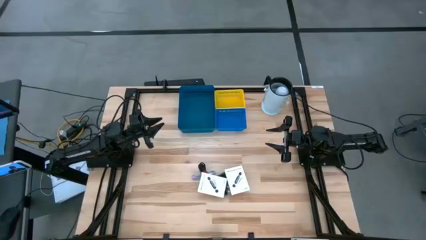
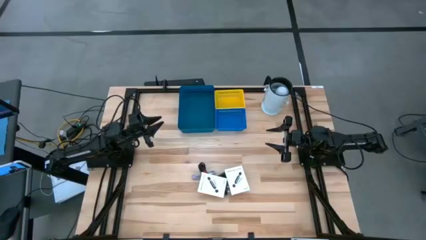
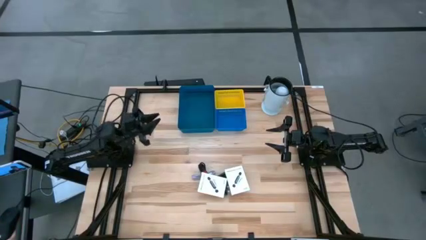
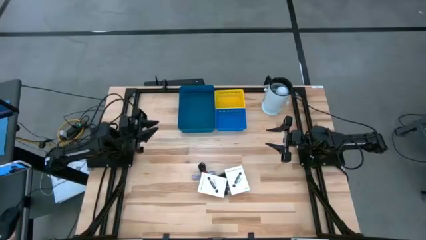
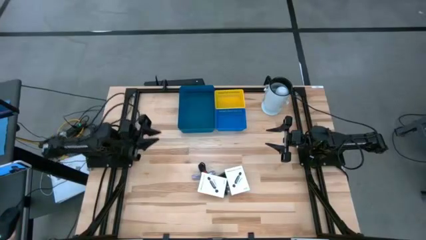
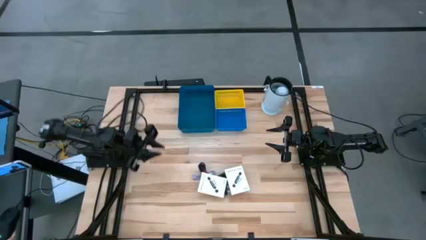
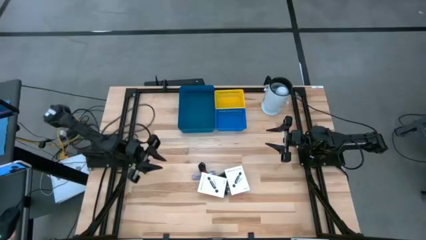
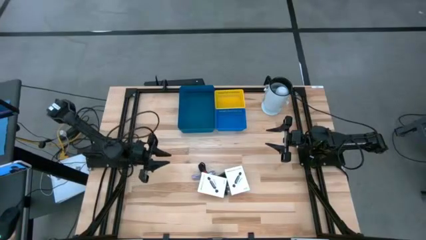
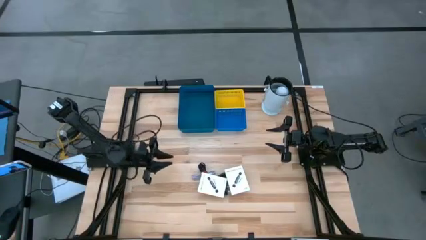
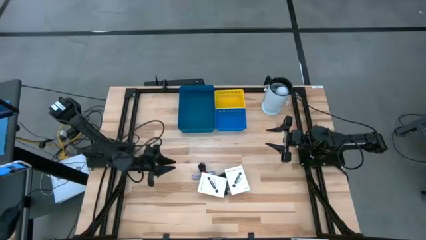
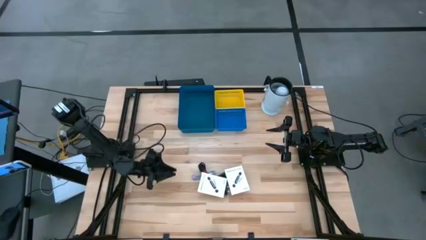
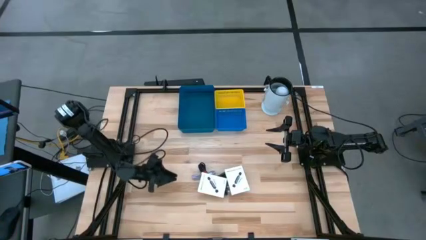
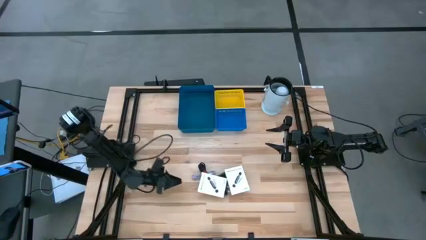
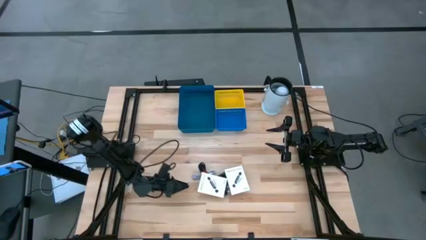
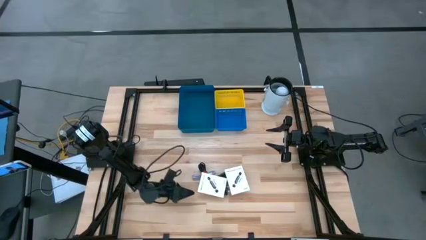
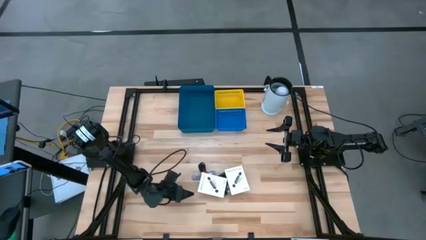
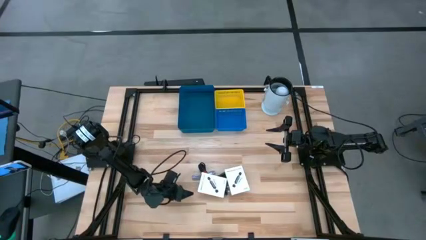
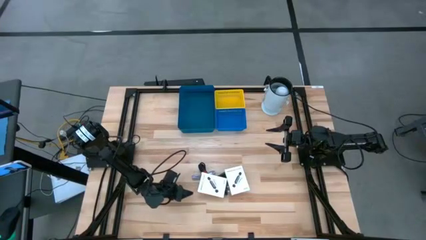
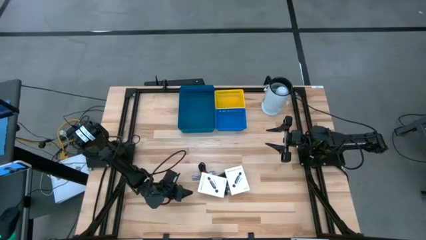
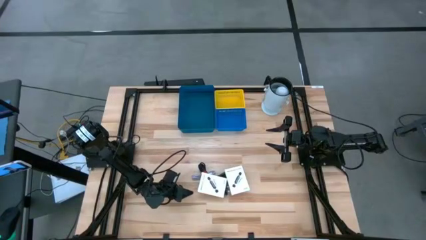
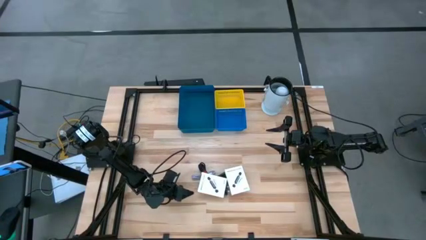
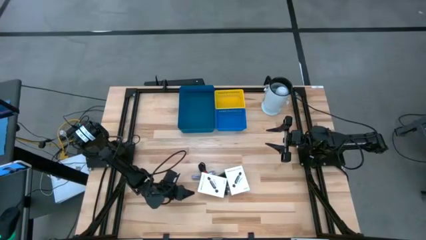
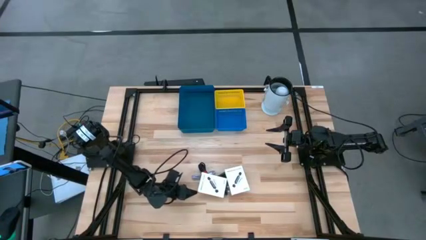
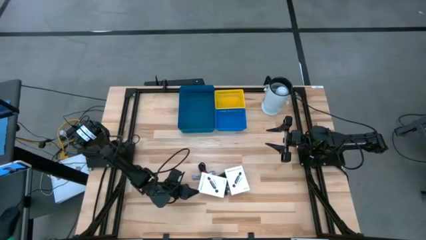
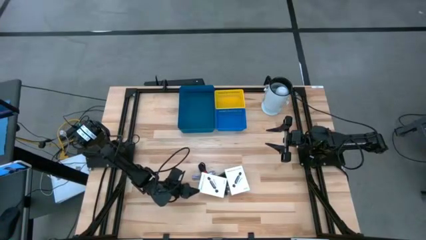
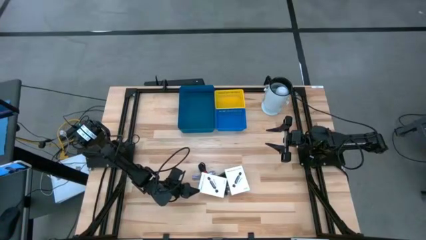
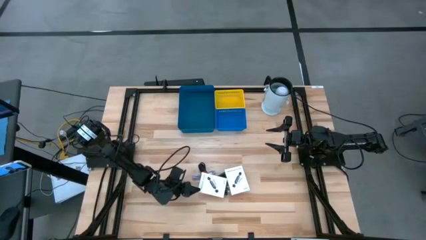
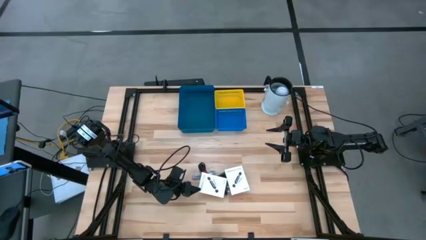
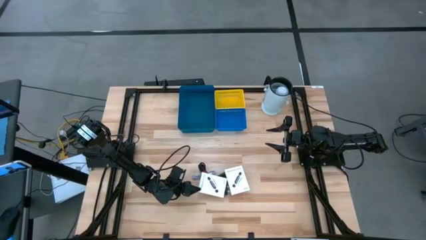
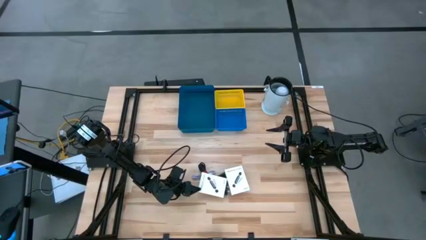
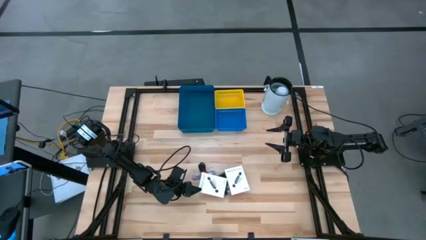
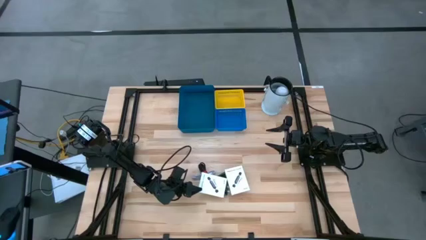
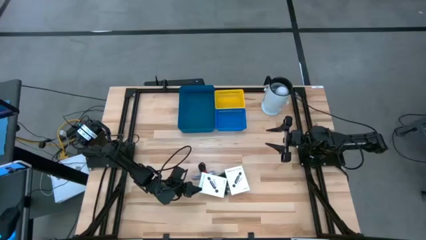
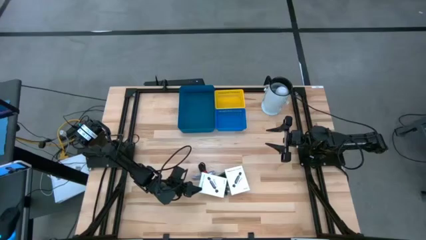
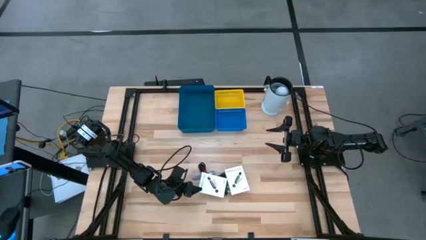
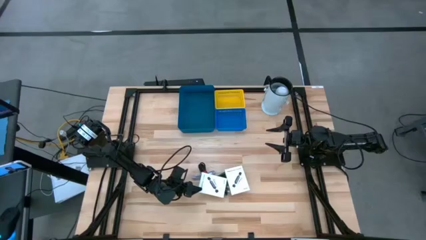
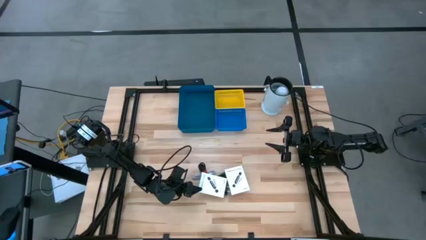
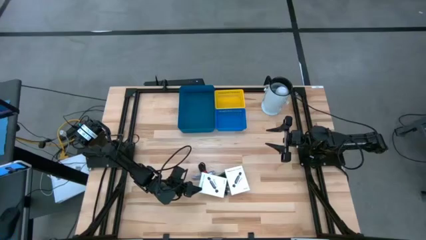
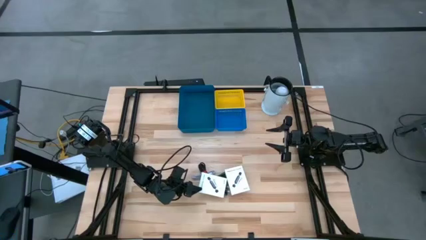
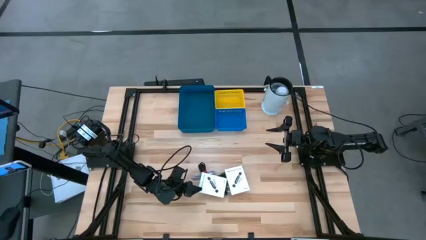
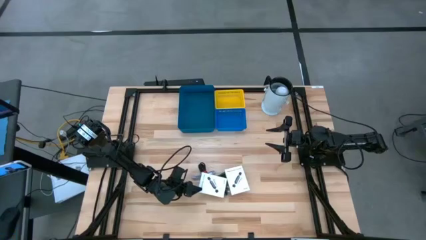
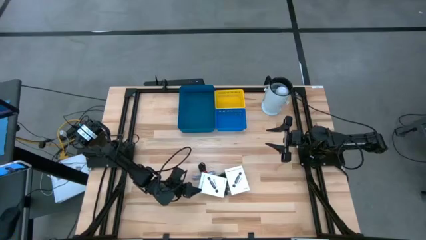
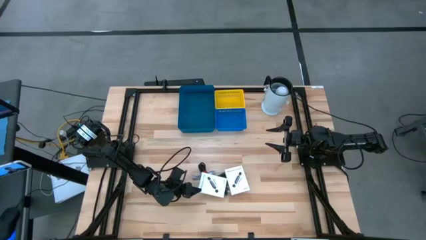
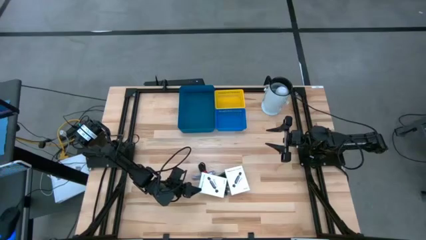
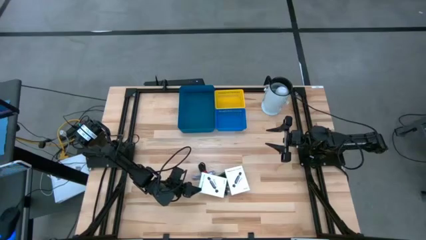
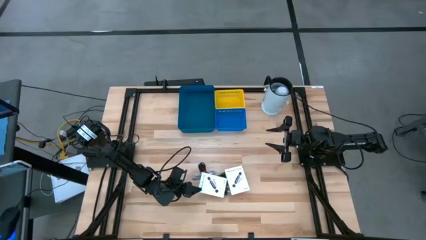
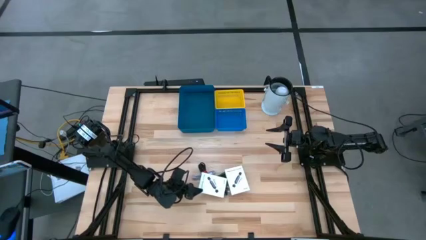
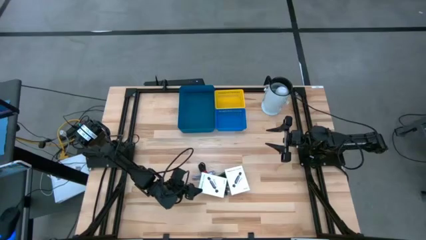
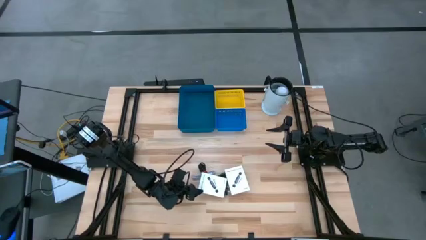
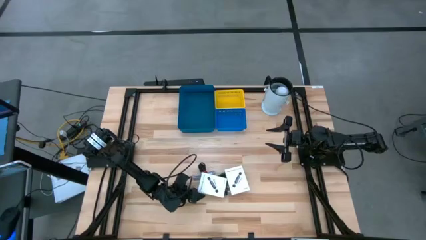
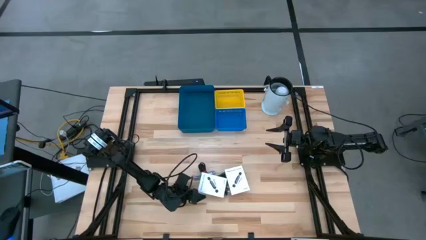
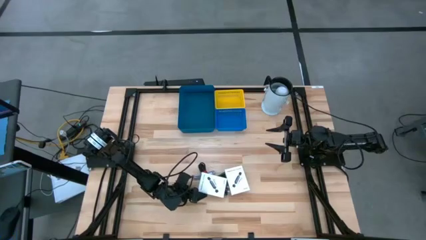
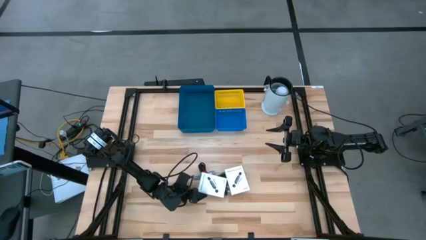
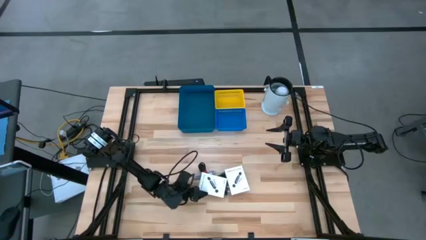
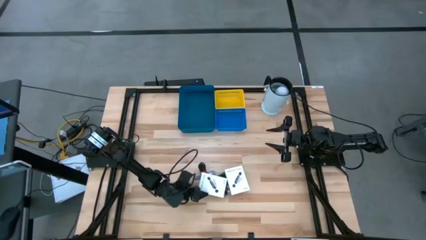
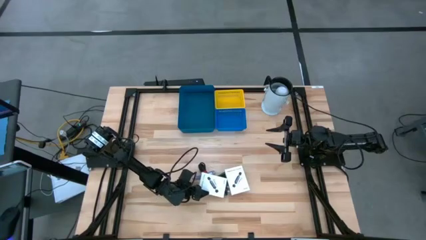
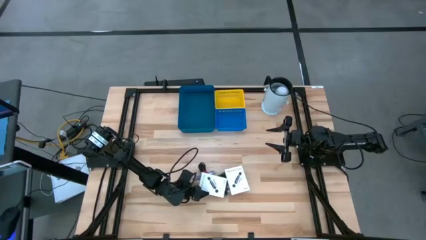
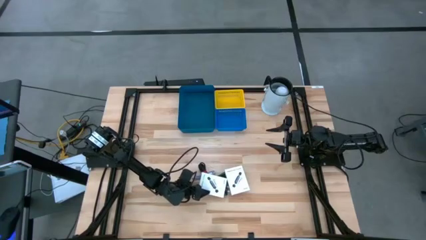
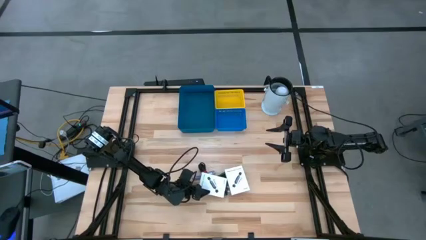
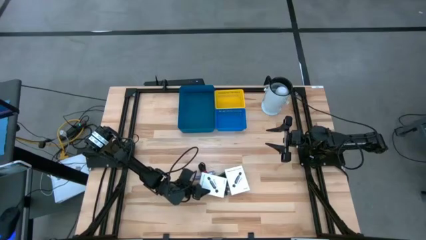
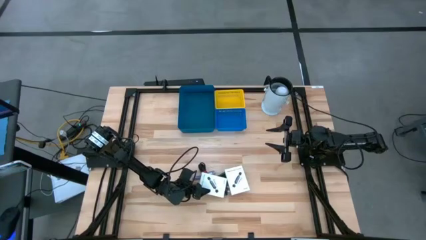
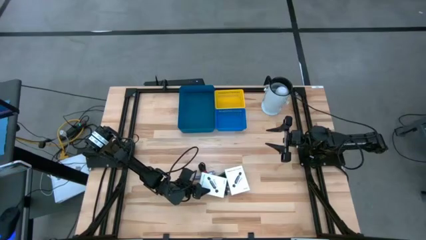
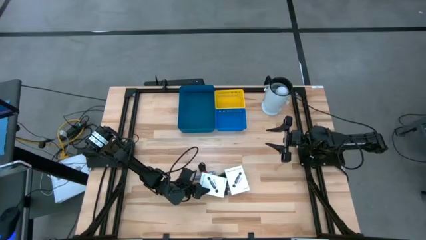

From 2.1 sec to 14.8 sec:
Task: Pick and place items into bin
Put the left white card reader box into the blue bin
